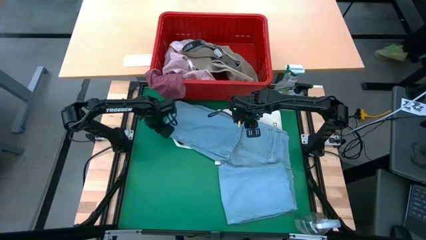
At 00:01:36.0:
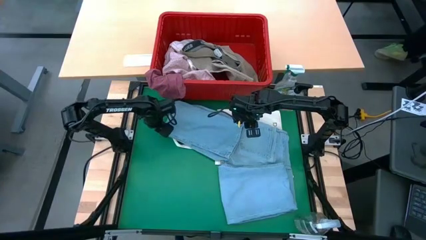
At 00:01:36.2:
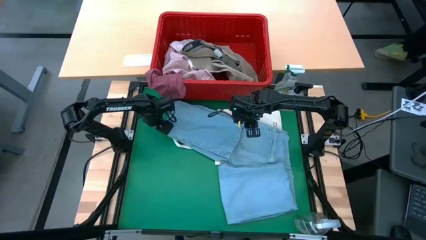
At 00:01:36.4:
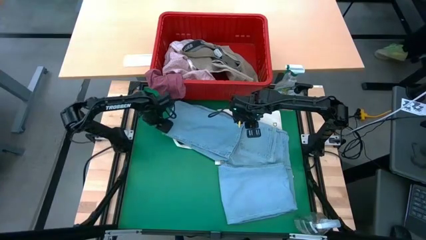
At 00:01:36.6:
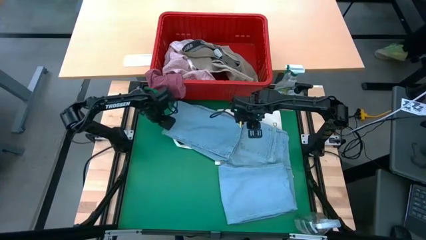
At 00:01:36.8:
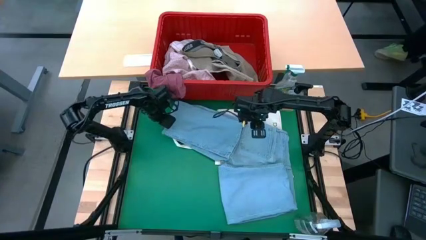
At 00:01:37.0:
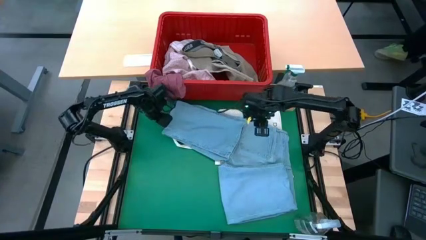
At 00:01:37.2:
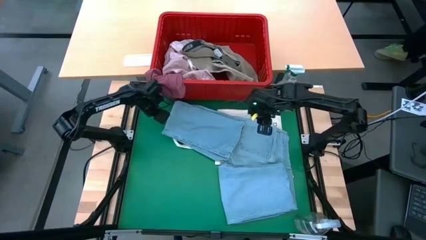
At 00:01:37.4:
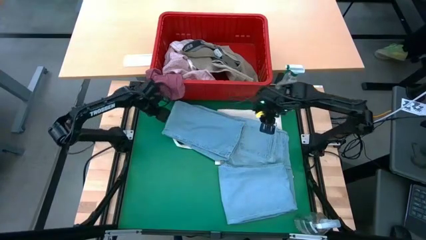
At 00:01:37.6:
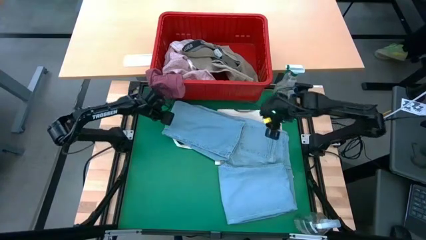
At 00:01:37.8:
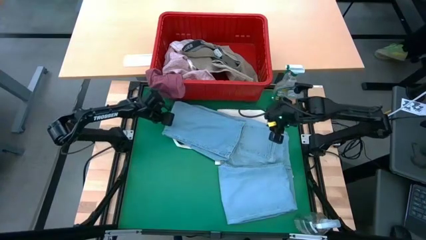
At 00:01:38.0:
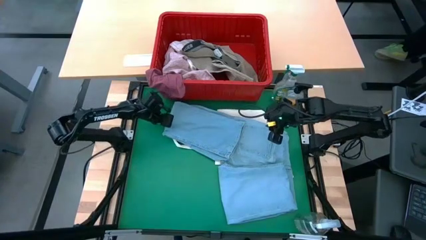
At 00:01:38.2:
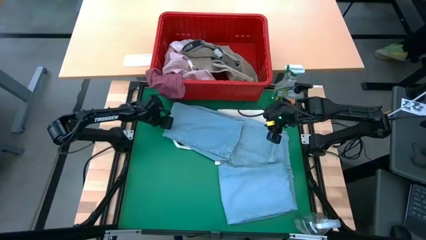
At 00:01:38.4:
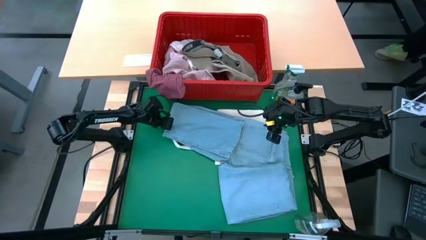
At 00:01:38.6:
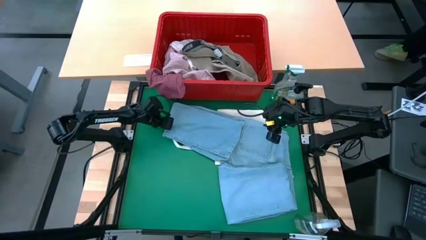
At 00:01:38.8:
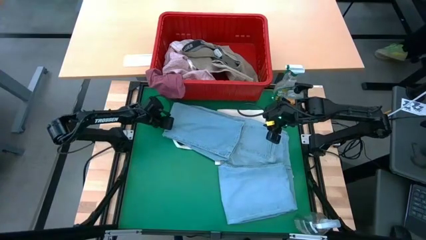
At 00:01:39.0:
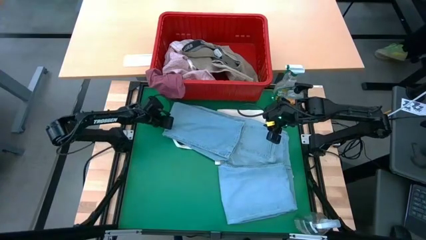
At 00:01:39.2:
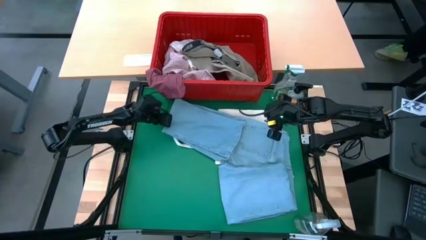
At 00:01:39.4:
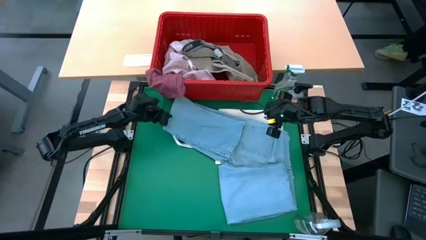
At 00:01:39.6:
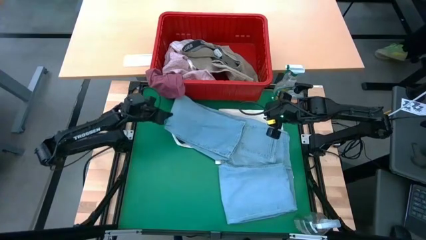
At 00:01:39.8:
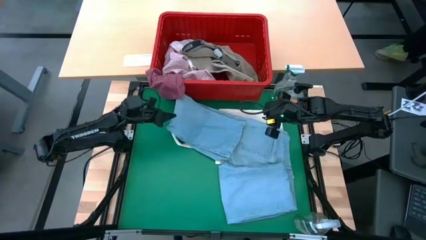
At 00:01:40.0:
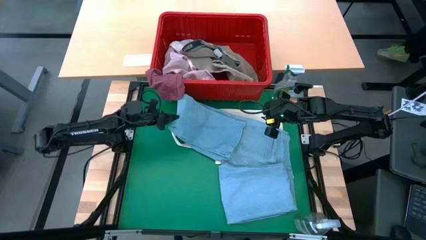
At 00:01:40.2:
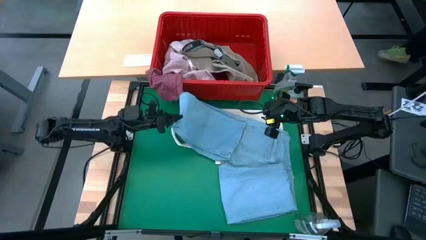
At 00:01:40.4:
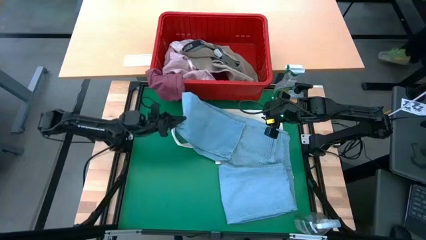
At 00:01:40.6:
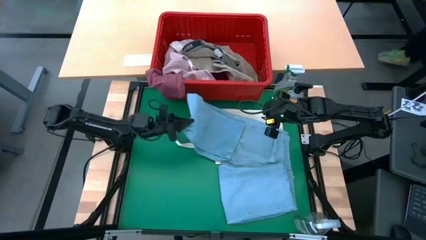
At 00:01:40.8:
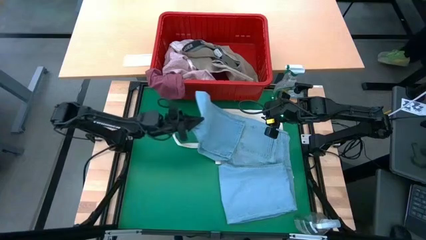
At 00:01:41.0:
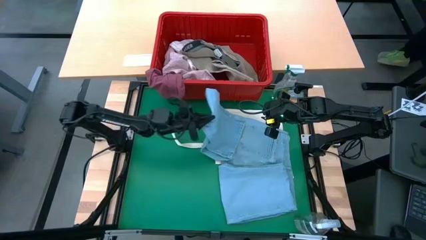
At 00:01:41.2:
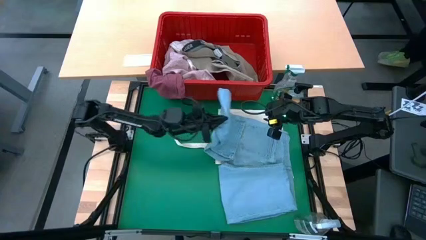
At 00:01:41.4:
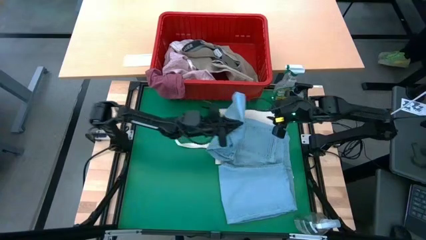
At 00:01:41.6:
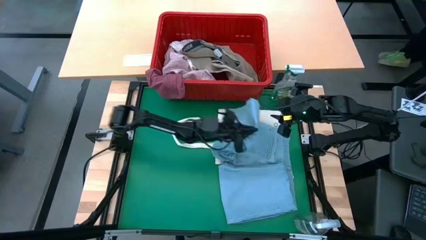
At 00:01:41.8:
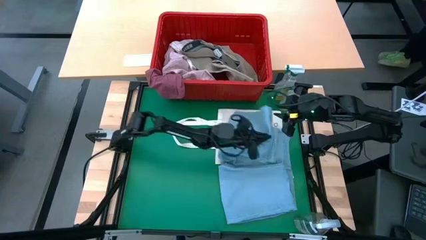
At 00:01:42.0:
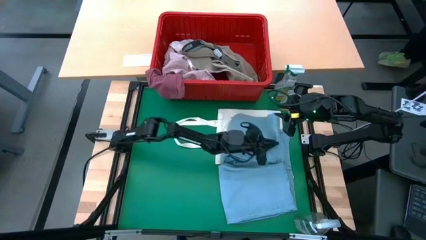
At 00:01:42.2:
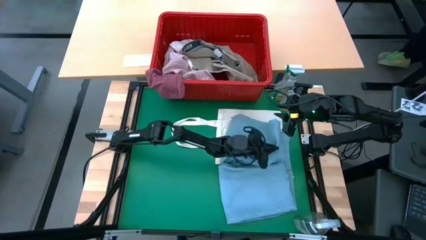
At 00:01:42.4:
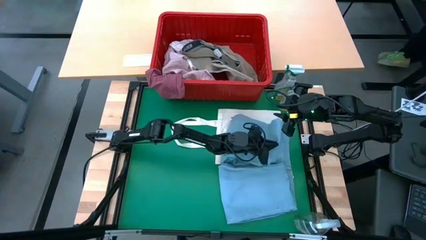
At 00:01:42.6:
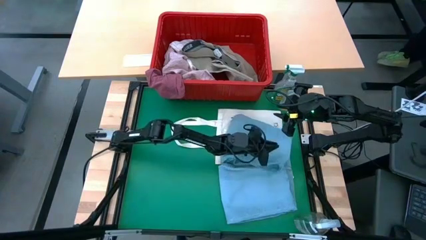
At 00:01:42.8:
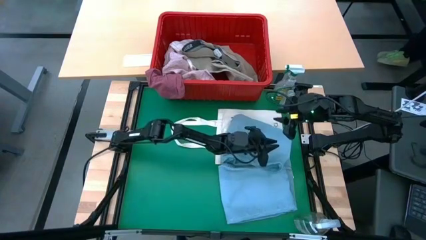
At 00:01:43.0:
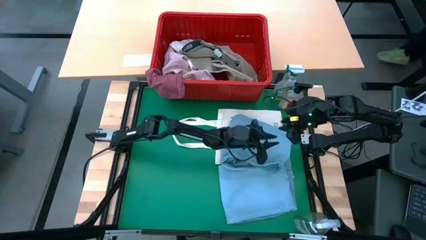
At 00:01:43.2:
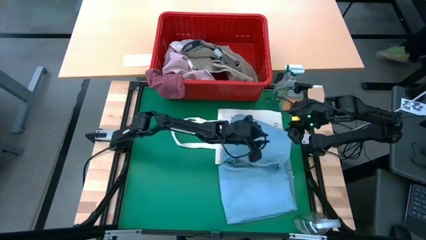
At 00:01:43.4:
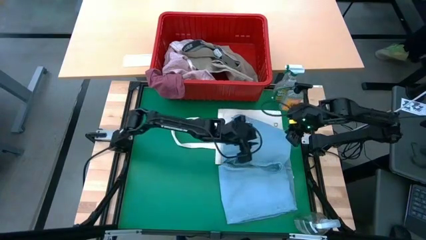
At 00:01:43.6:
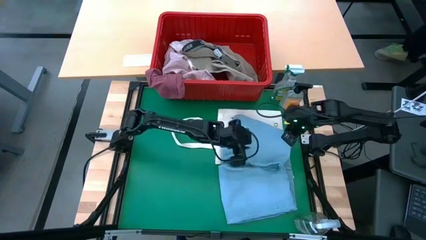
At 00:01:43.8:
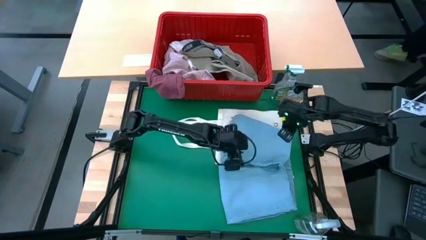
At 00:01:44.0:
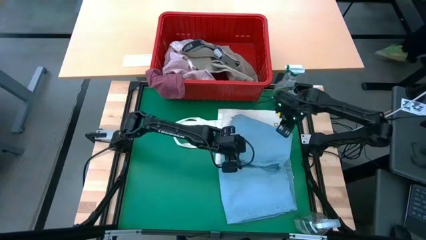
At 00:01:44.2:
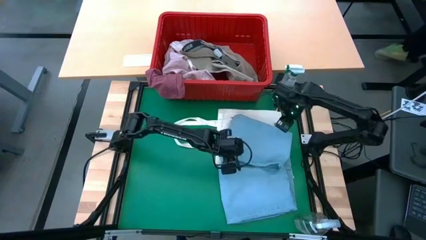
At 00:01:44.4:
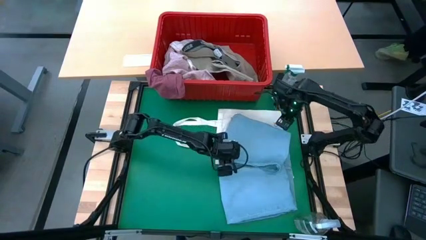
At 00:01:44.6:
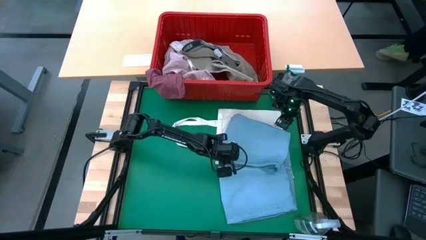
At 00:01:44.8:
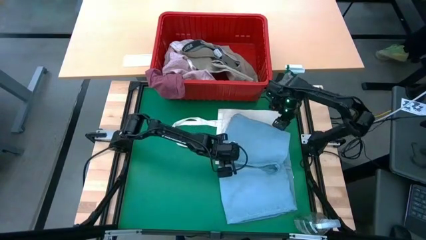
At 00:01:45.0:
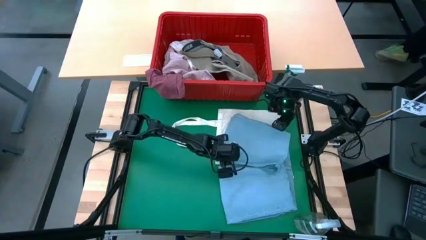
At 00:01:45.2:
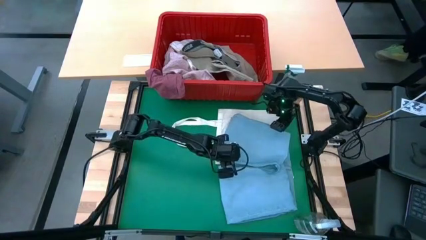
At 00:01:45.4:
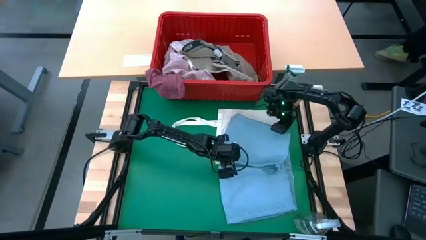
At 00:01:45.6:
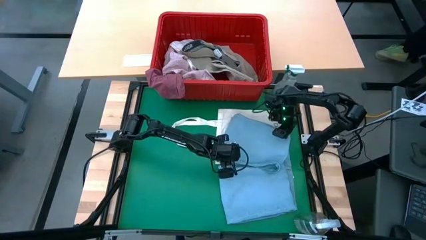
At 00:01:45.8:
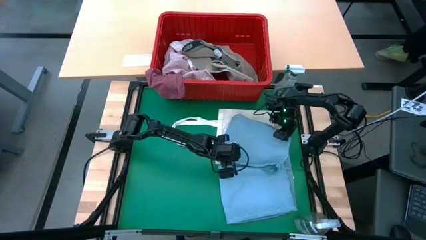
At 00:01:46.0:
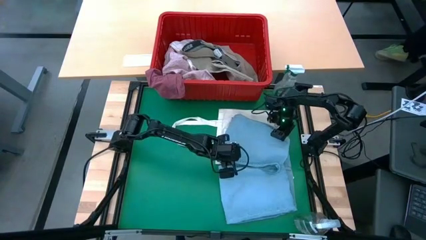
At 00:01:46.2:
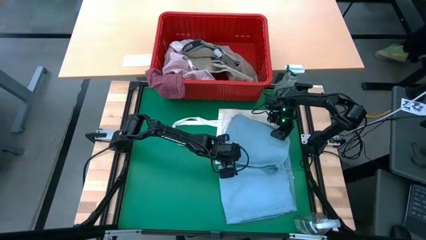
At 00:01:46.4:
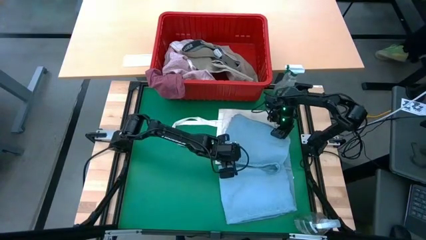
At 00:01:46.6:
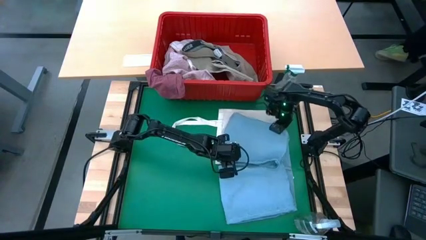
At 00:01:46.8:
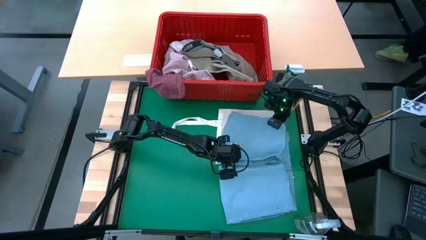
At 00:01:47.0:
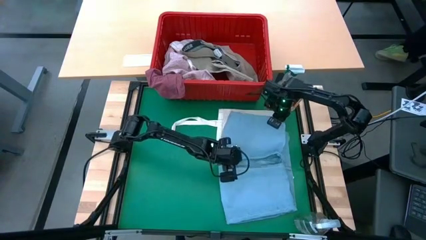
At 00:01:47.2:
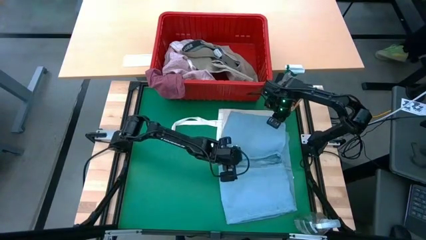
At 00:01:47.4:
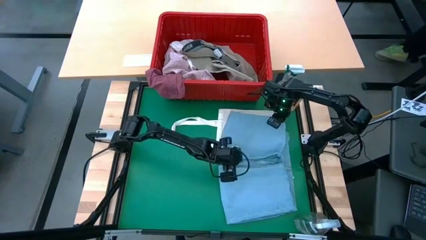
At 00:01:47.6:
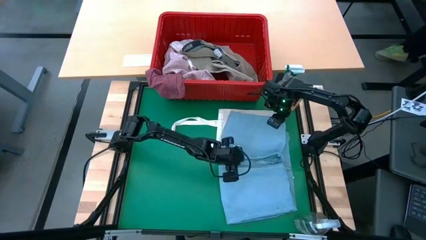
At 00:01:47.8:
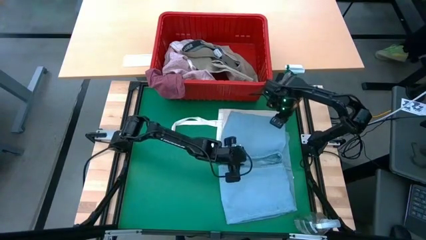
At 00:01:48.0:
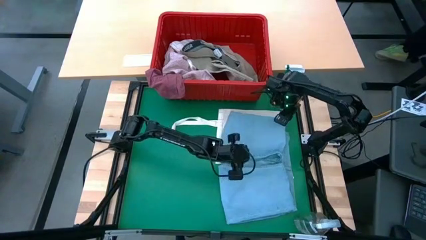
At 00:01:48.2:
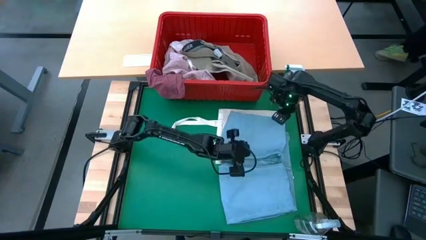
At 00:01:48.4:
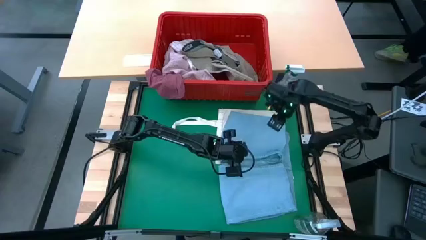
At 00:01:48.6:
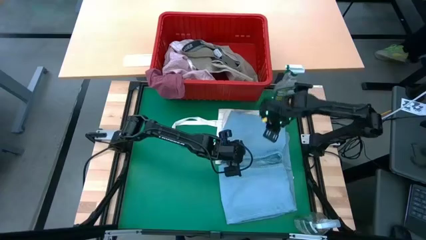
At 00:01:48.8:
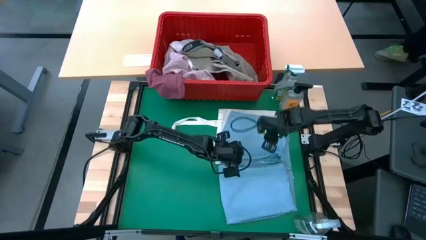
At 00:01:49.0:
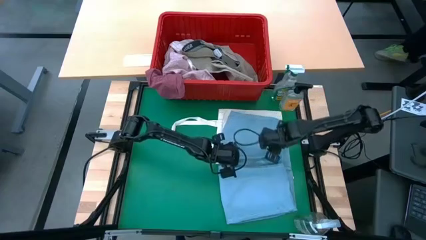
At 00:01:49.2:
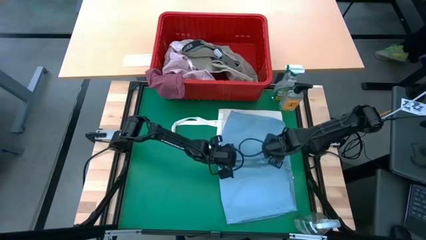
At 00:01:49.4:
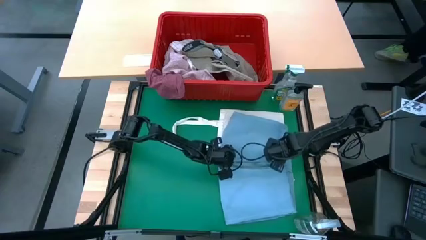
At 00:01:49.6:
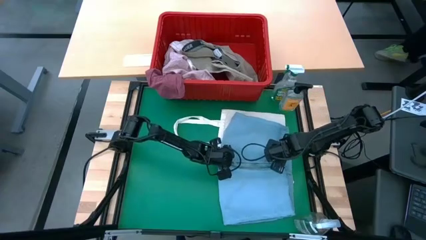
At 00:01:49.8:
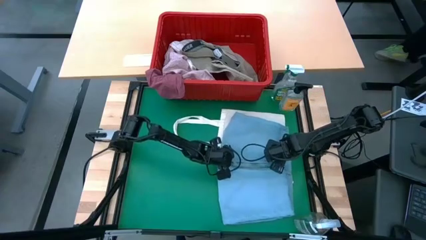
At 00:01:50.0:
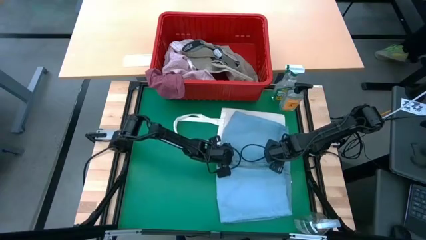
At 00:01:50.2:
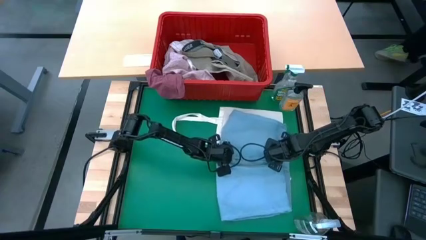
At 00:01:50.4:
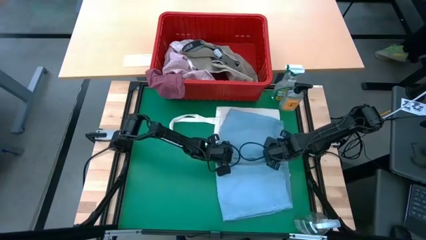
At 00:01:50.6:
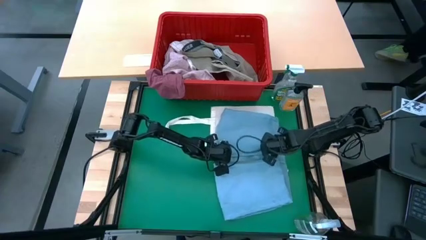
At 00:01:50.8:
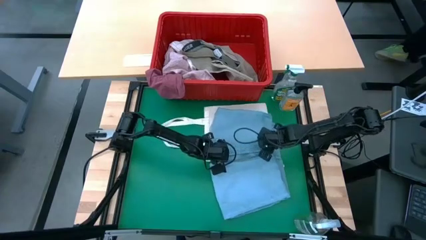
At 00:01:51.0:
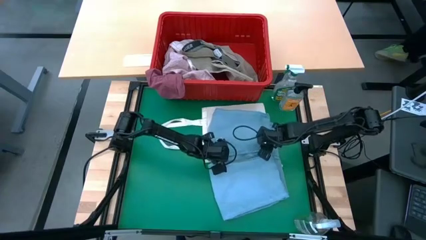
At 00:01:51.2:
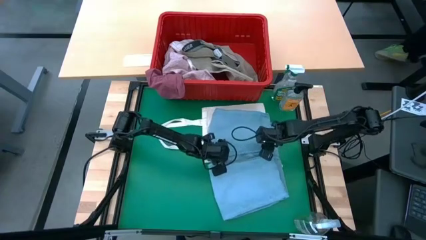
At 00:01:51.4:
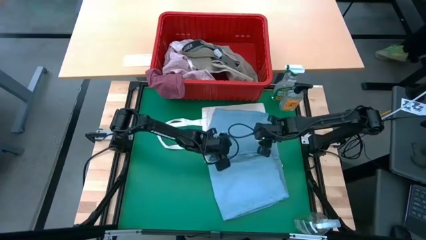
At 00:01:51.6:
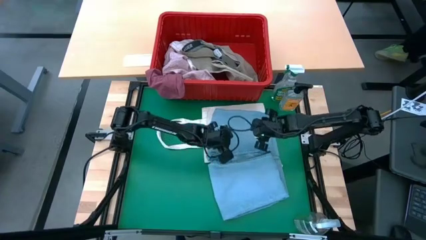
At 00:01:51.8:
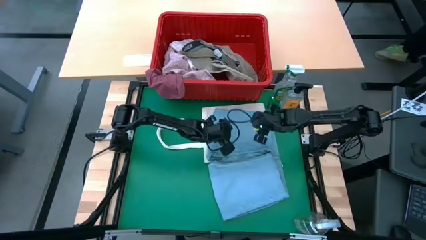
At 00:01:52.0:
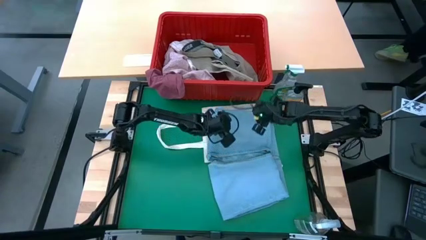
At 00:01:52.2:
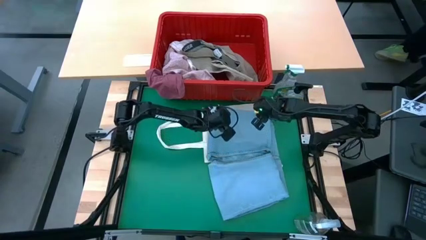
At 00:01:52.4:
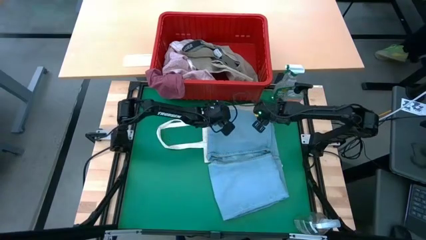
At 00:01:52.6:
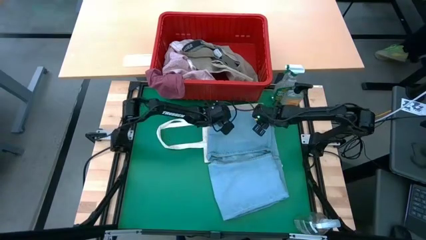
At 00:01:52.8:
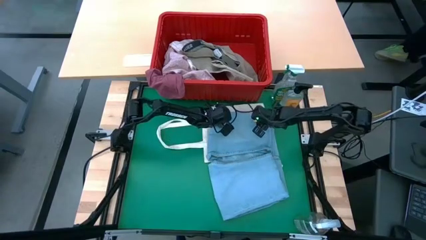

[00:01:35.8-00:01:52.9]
Task: Fold Laundry from Bin
Fold the blue pants from the red laundry basket
